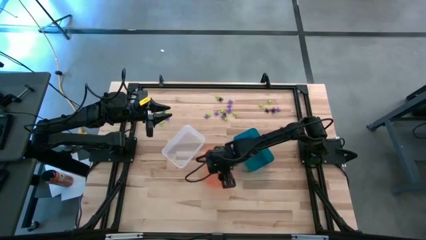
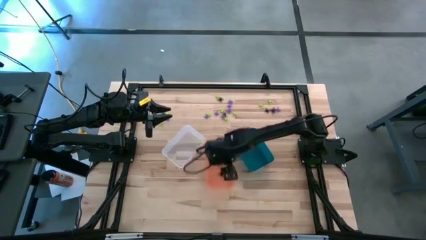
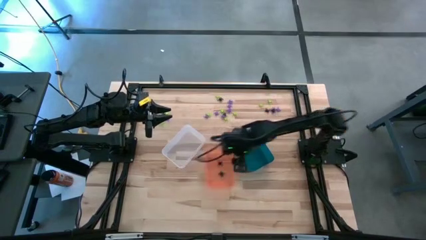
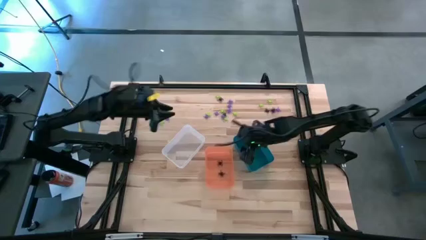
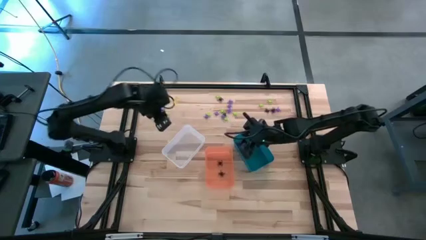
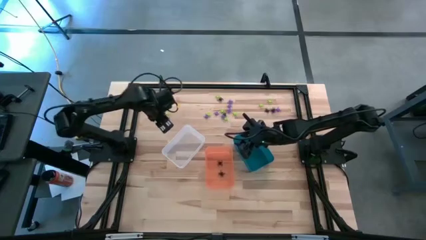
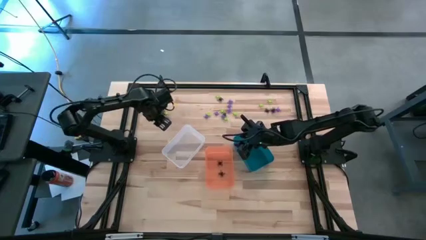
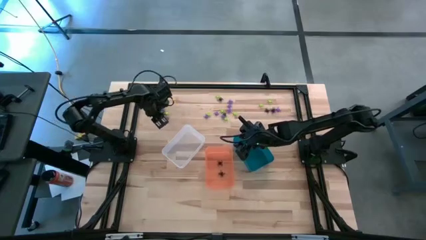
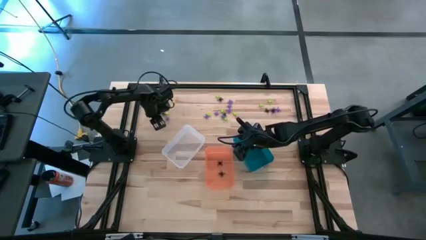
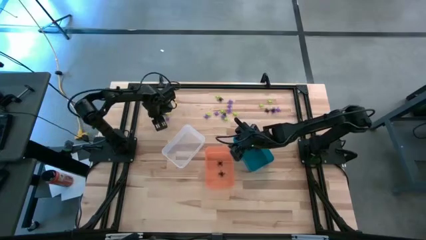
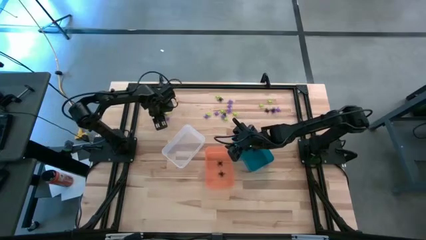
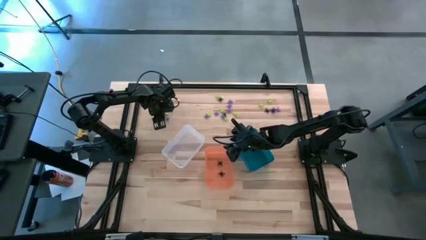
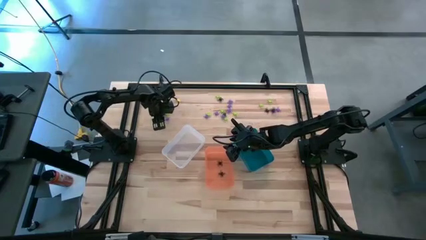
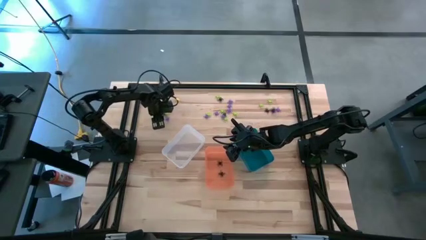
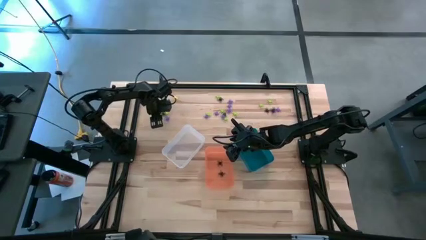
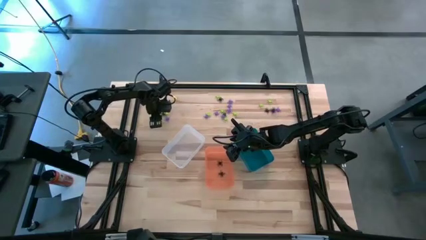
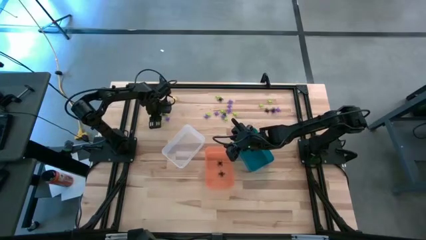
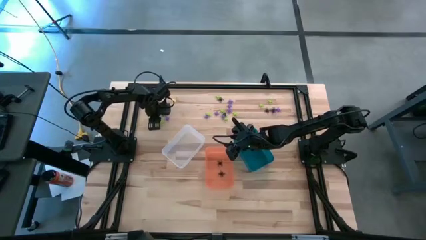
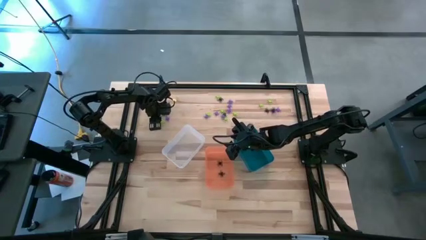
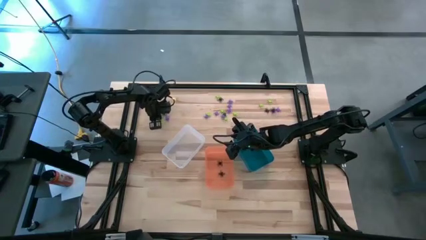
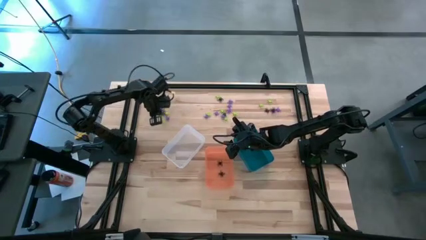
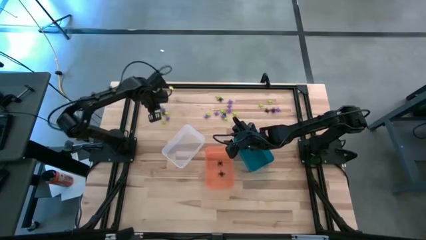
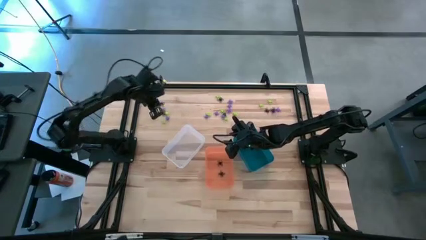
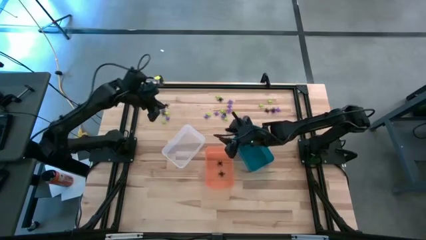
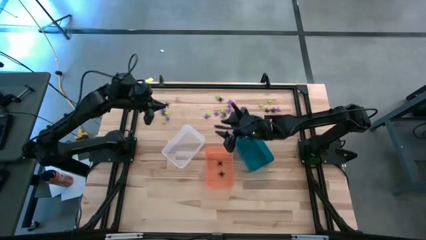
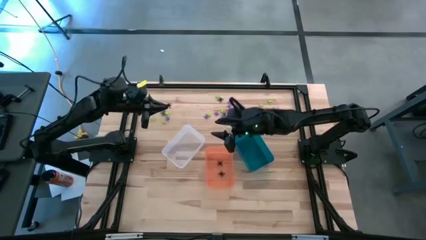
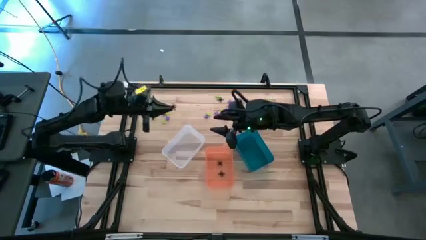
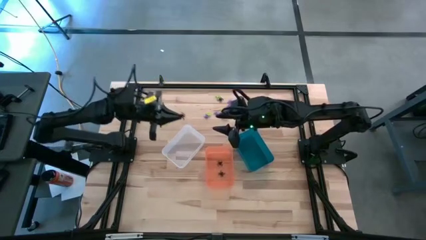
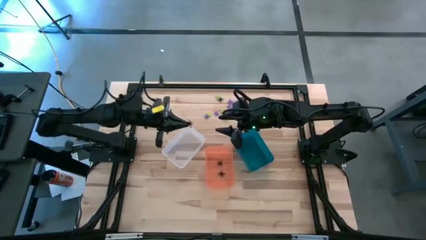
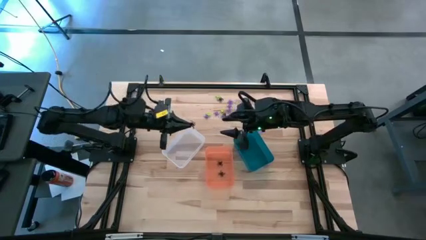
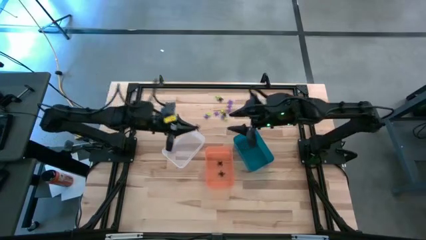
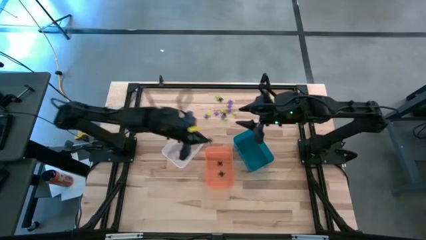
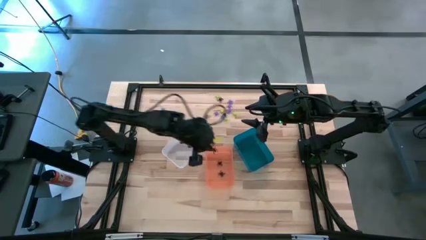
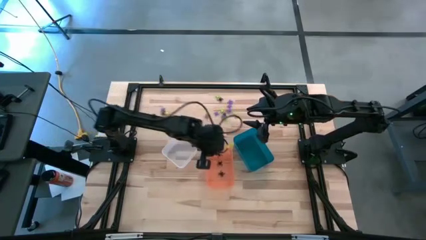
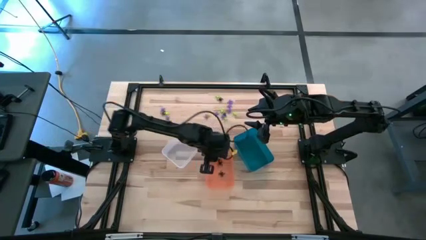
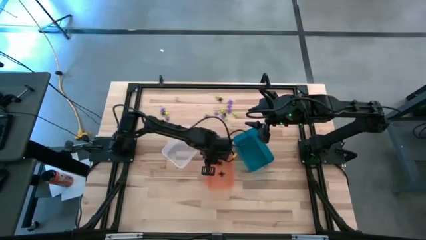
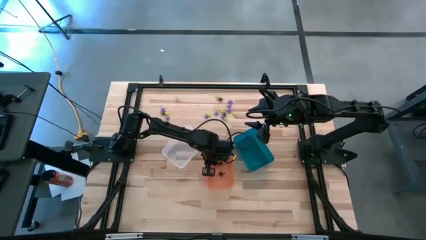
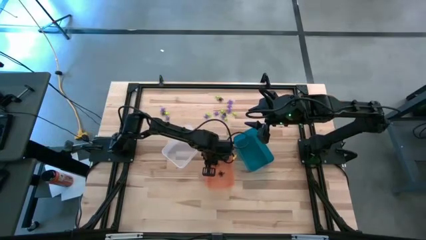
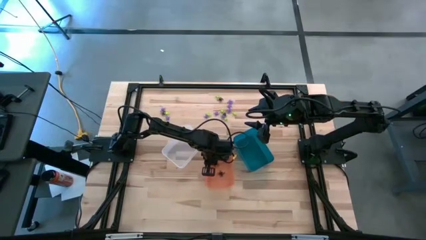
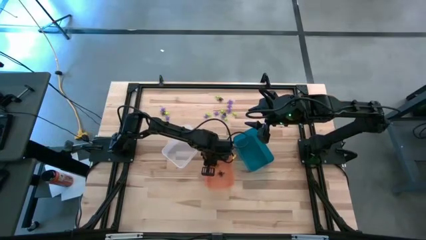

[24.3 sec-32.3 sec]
Task: Sort Halloween decoration
Put the black spider toy into the orange bin

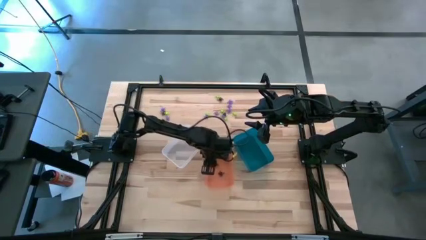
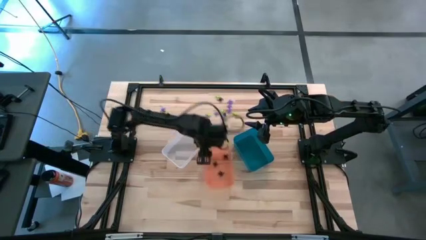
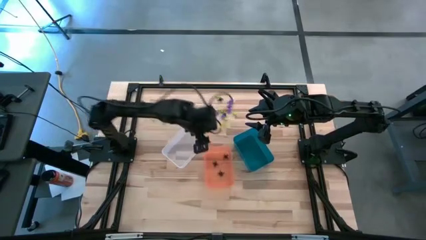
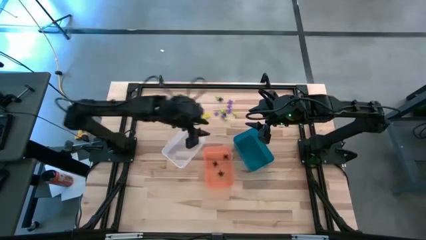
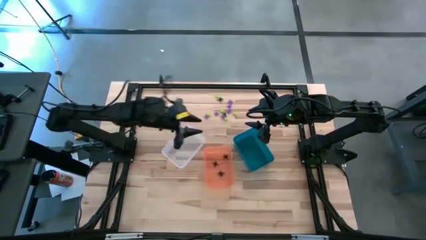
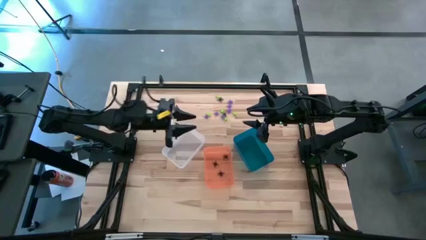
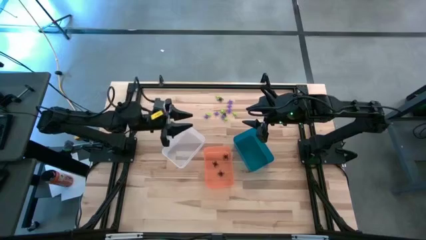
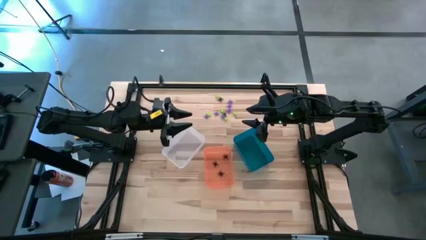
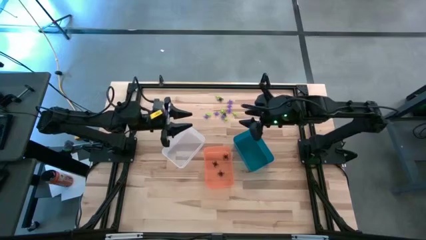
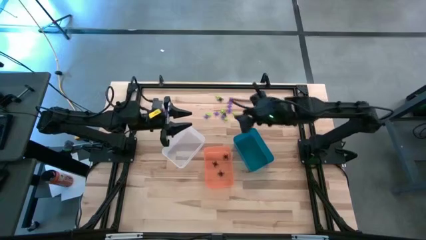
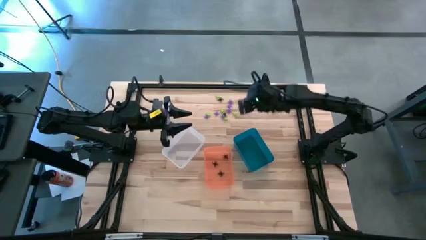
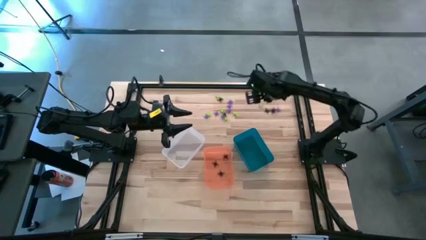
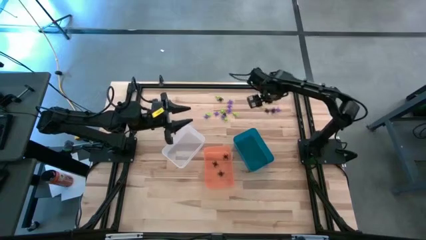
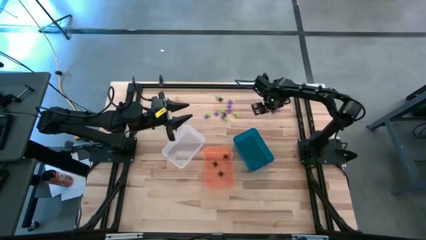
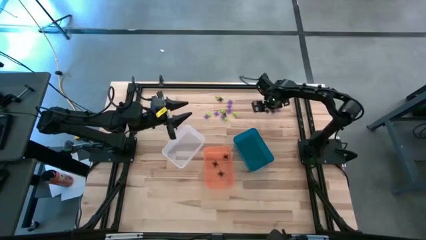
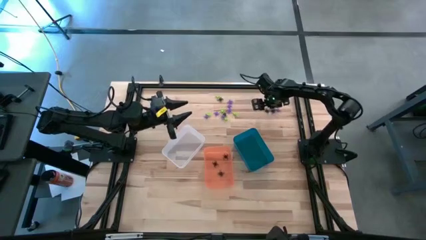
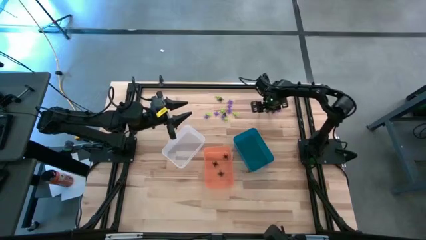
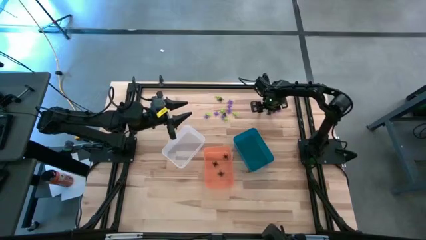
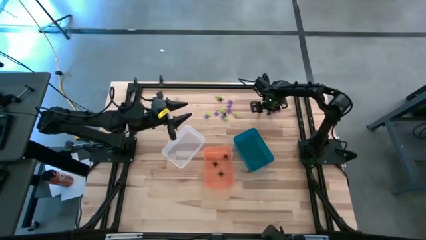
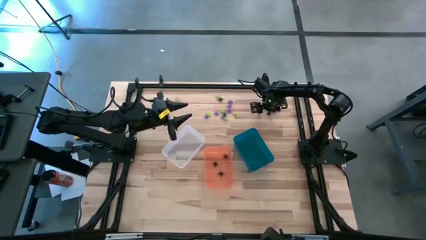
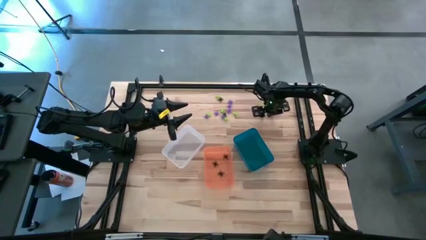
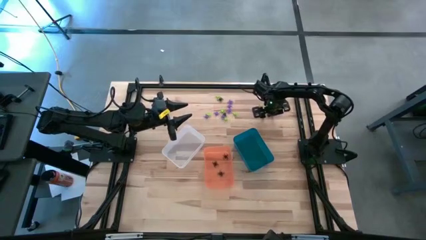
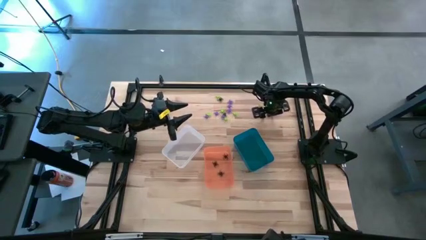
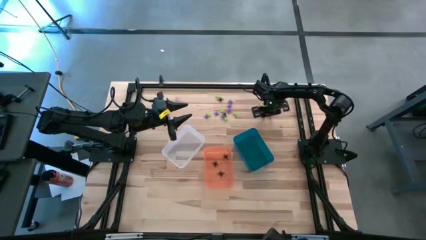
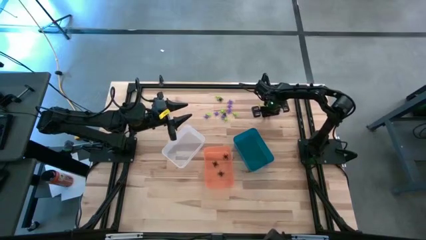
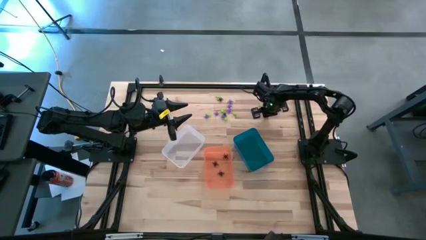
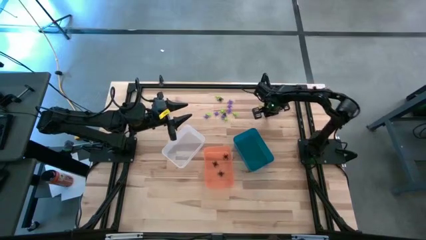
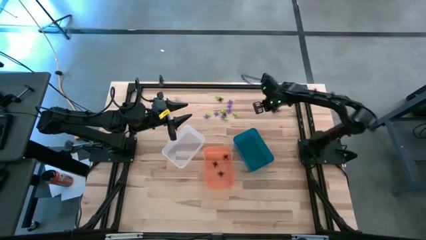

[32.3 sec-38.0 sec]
Put the black spider toy into the orange bin

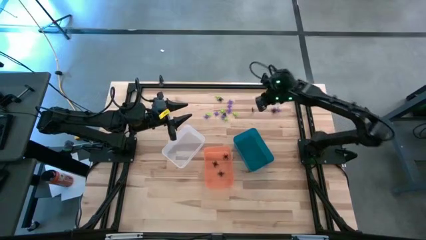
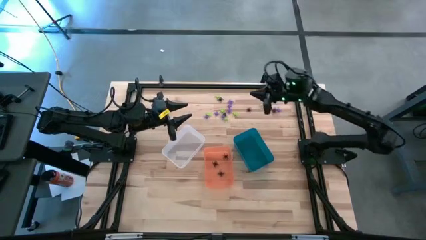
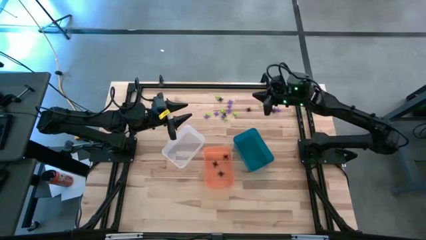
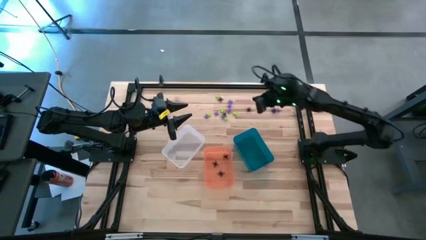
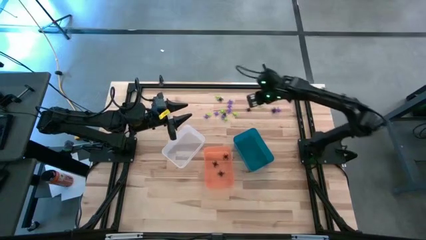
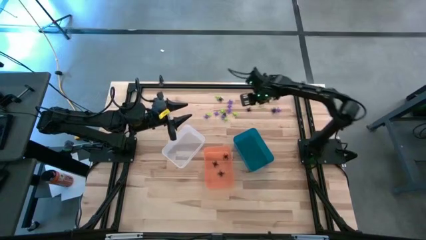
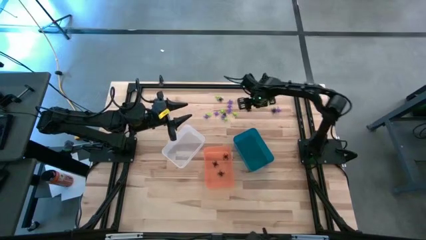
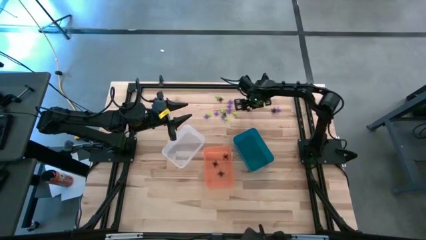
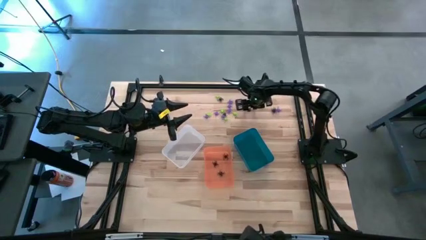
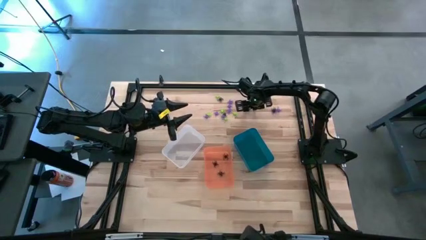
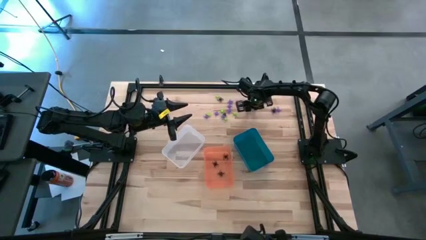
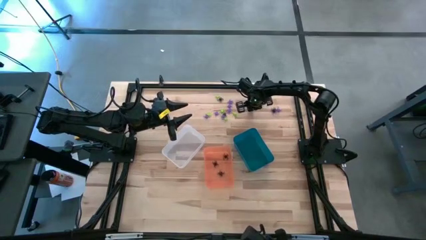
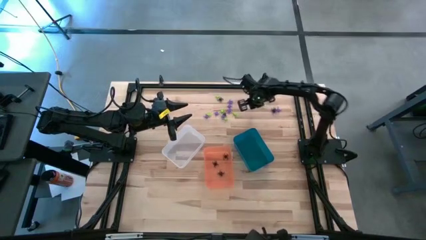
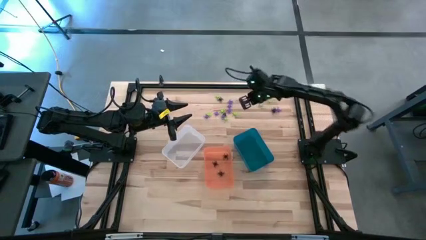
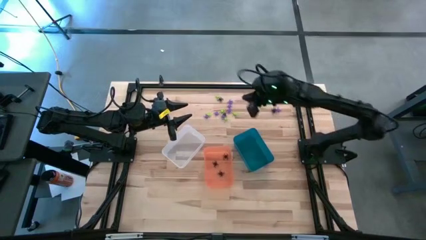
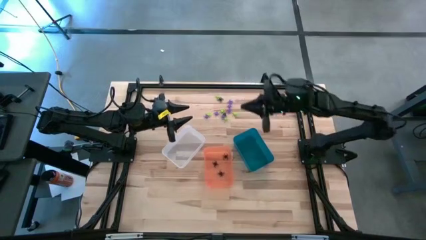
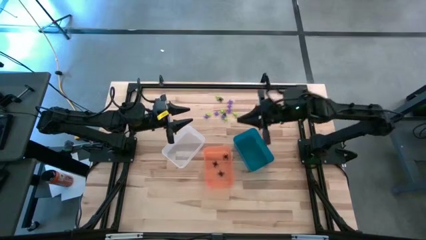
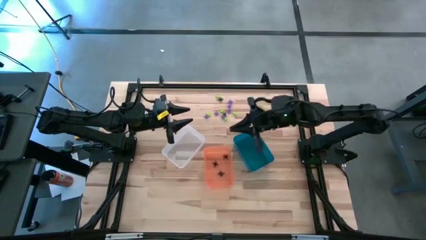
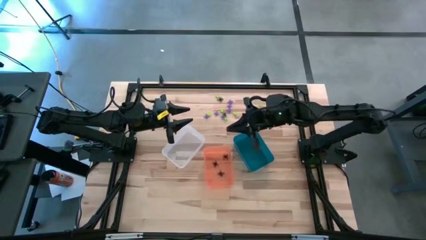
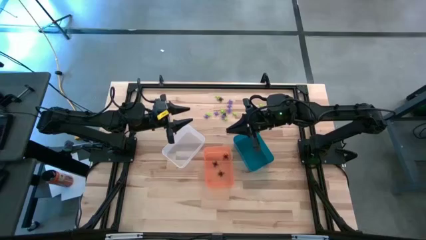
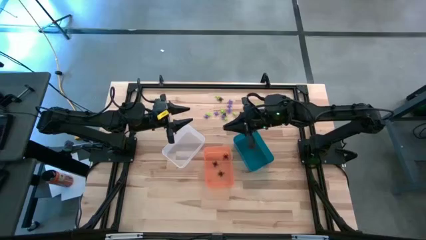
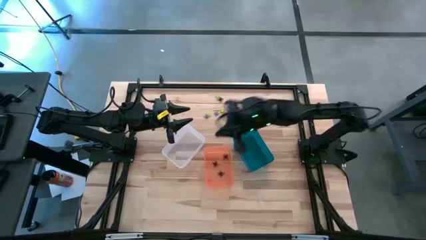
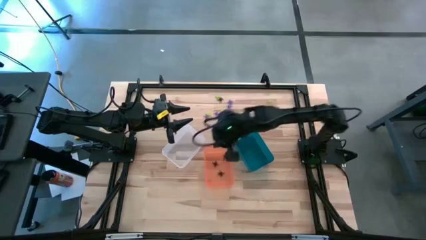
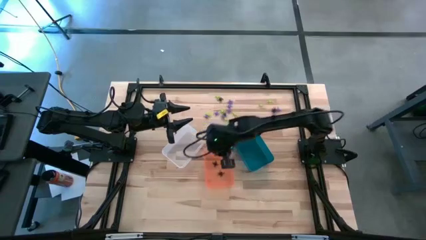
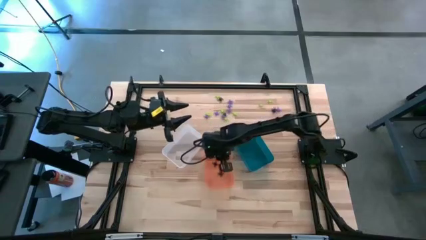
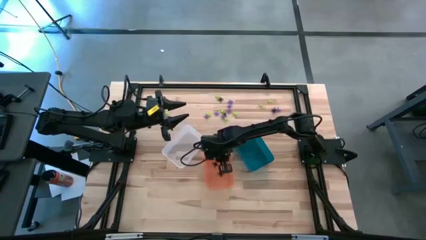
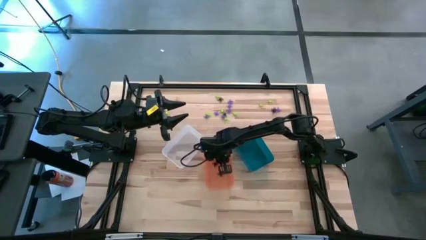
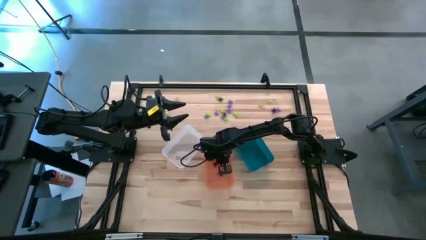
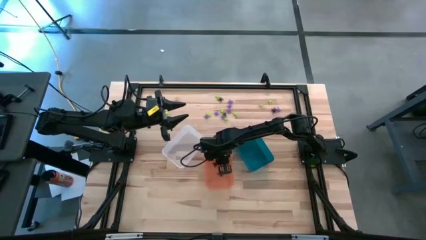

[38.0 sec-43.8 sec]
Put the black spider toy into the orange bin
